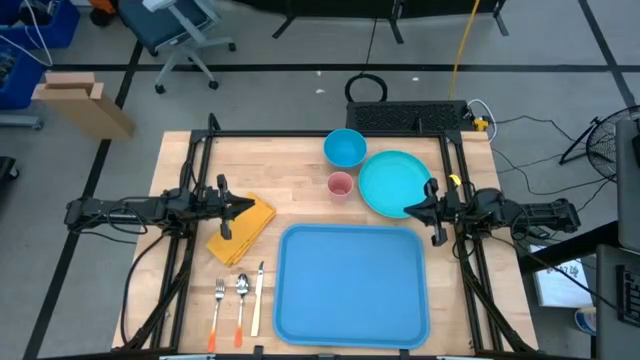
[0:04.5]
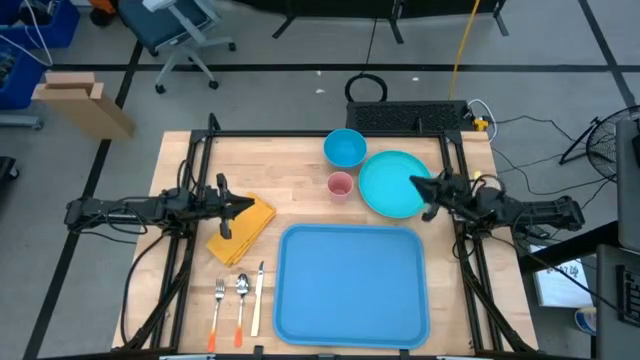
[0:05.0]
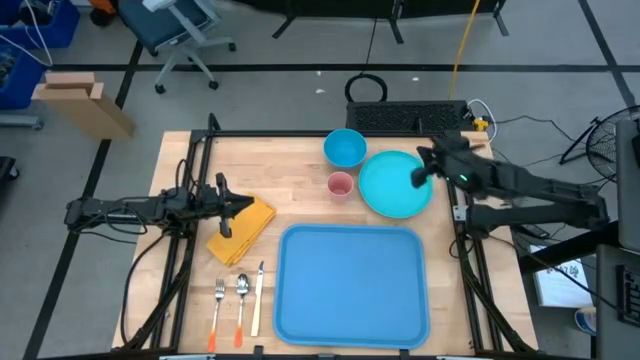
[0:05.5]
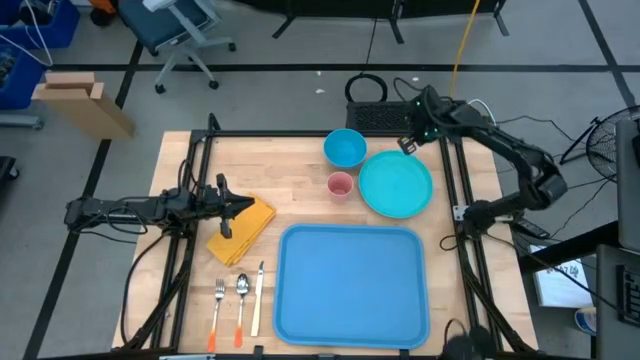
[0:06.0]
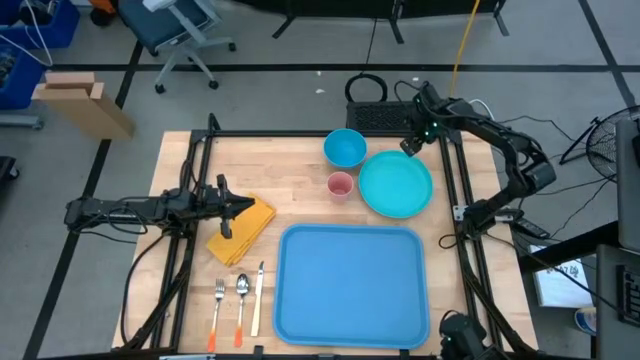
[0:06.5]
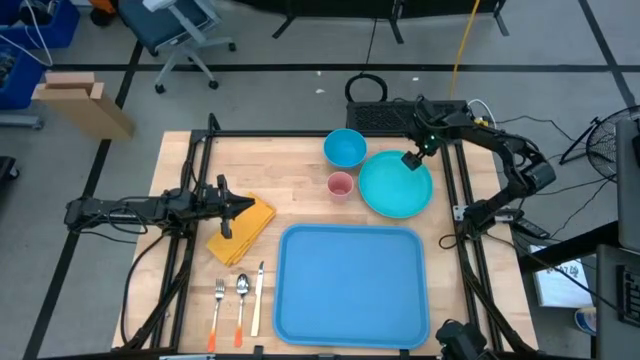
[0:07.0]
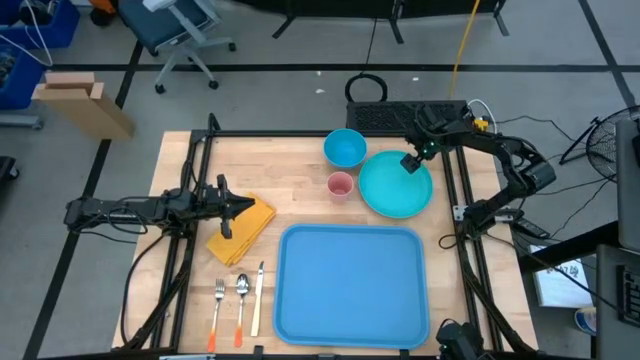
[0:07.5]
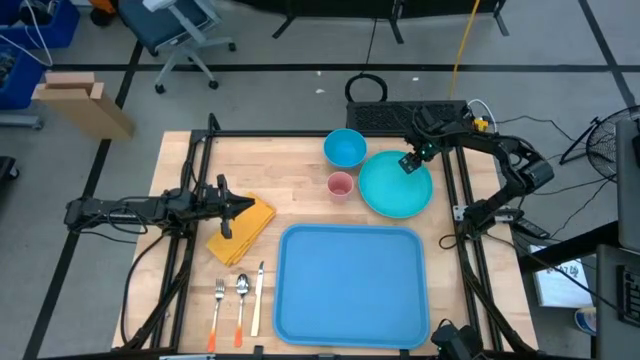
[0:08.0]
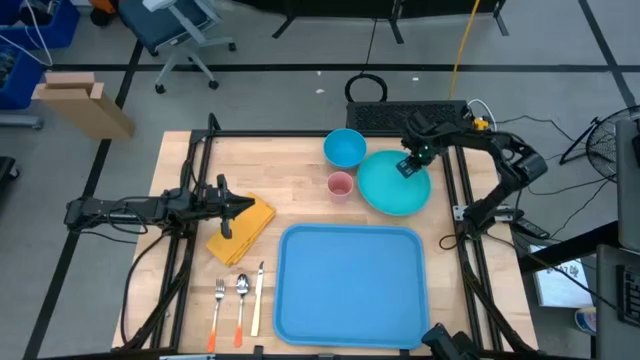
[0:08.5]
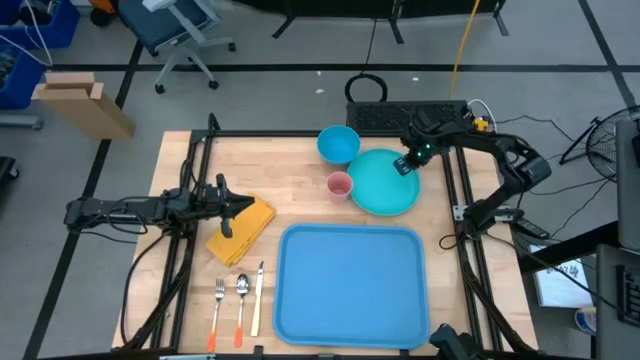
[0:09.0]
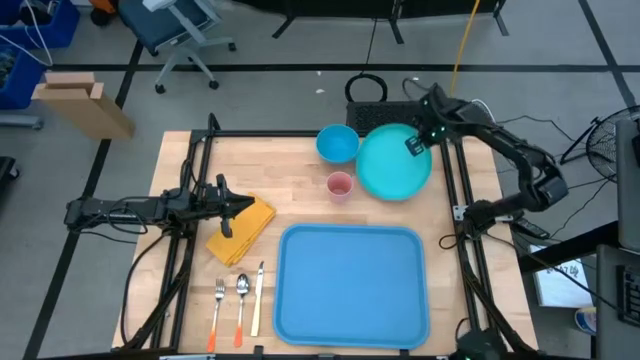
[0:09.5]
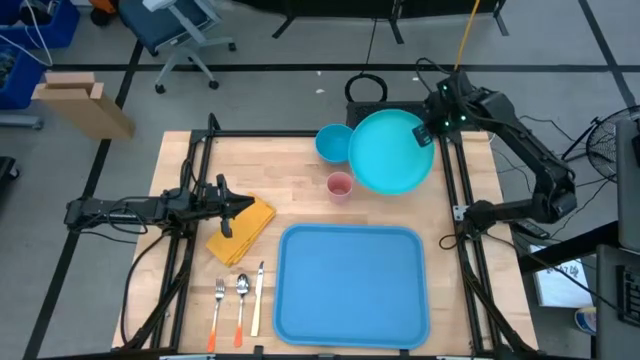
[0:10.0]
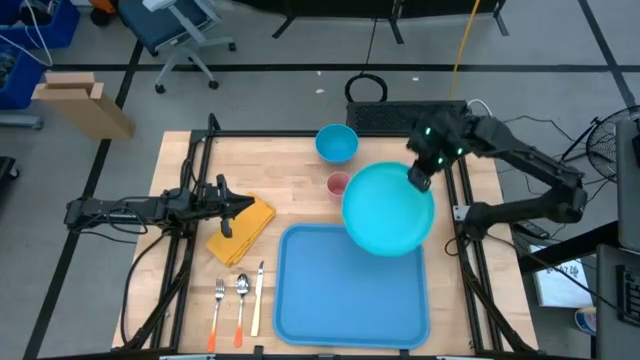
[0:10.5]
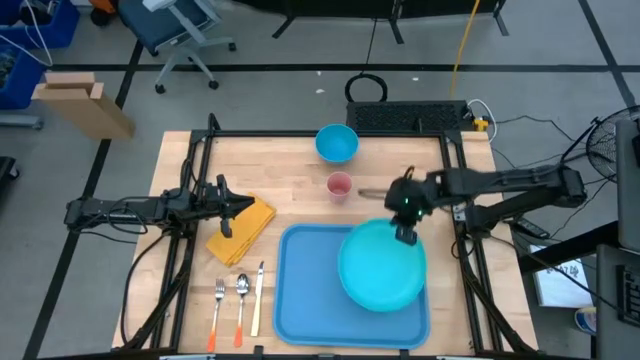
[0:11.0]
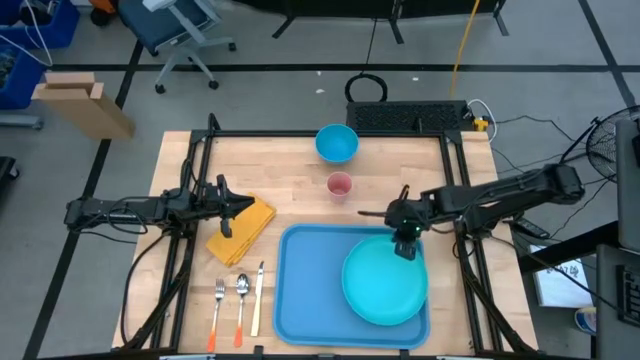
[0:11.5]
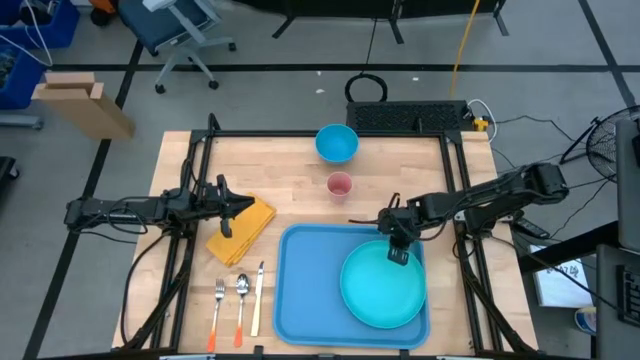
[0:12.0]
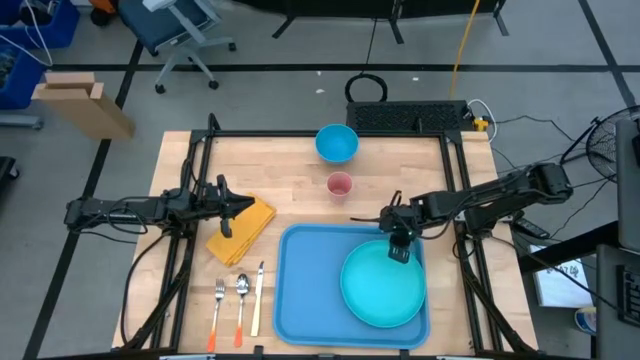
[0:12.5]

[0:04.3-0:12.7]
Task: Set up tray
Put the blue plate on the blue tray

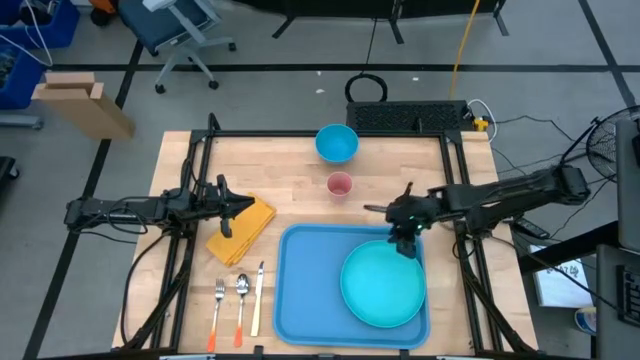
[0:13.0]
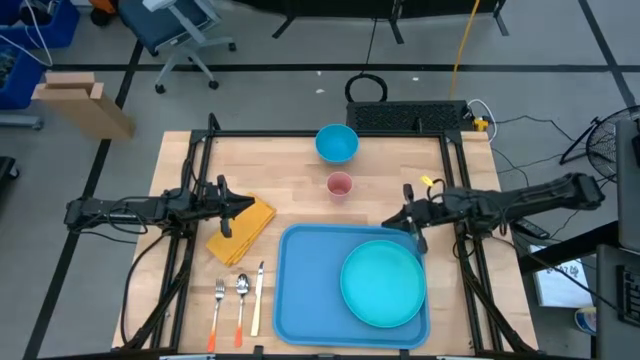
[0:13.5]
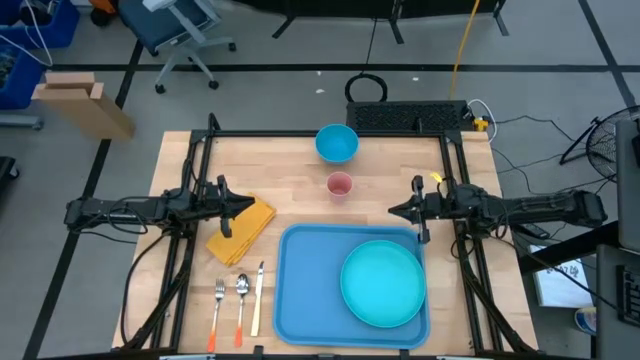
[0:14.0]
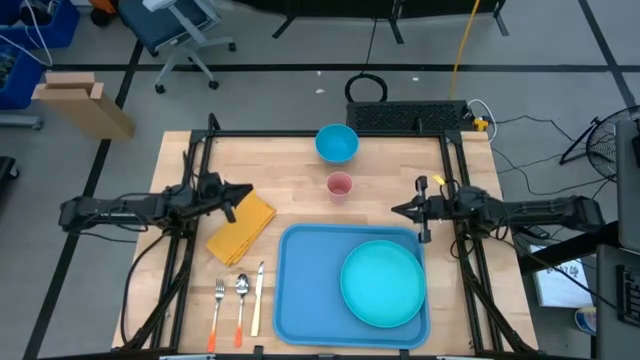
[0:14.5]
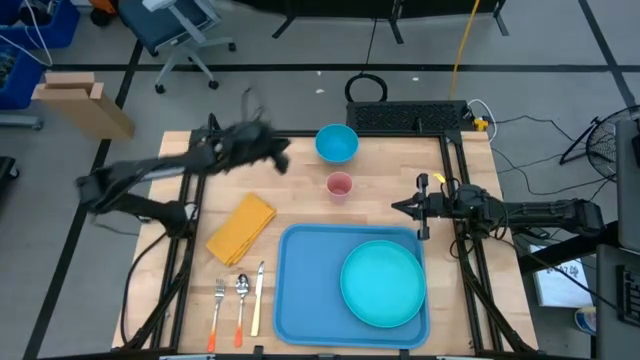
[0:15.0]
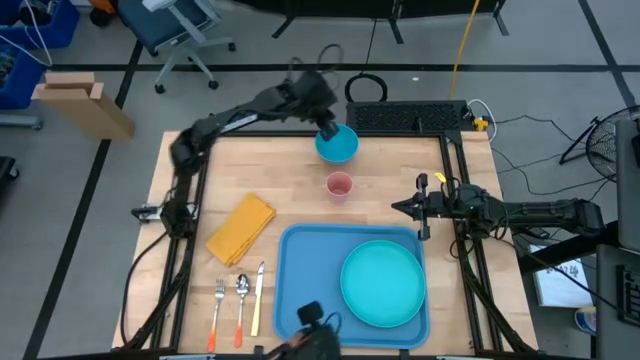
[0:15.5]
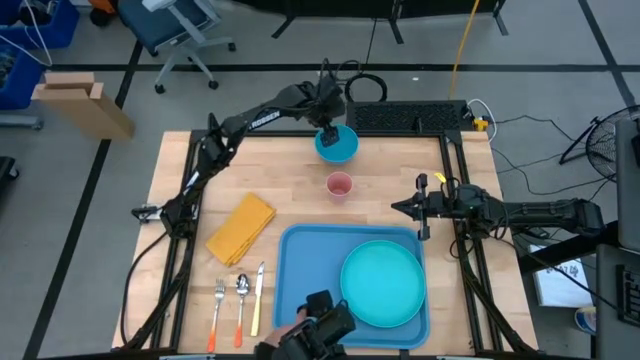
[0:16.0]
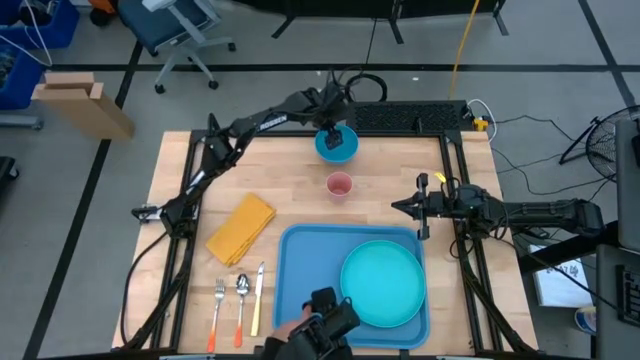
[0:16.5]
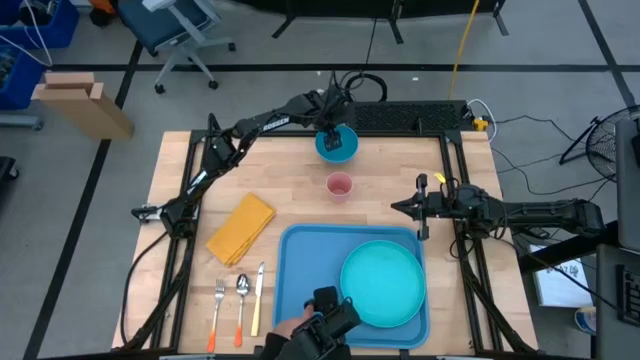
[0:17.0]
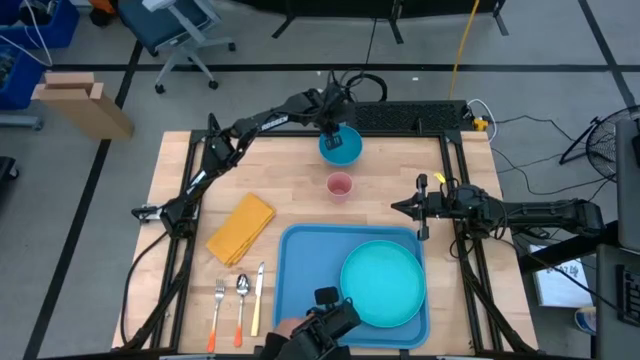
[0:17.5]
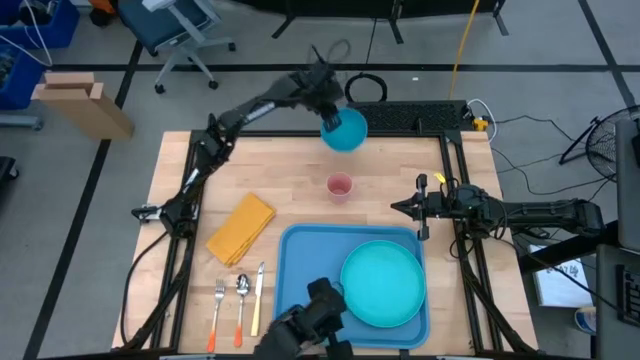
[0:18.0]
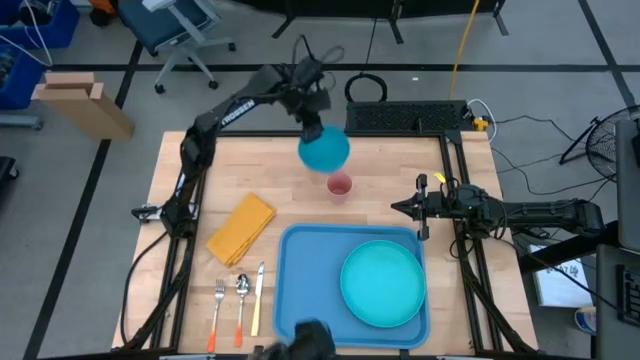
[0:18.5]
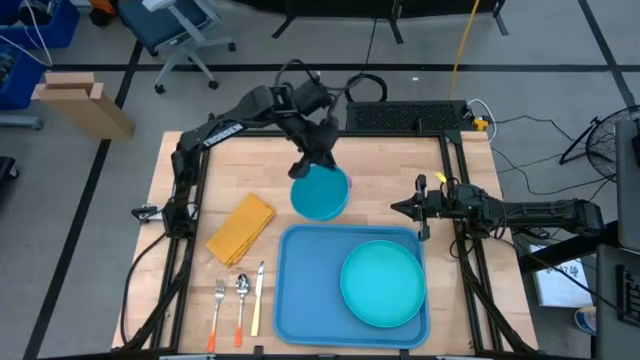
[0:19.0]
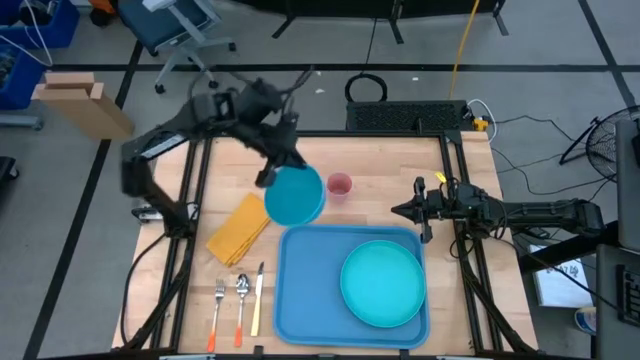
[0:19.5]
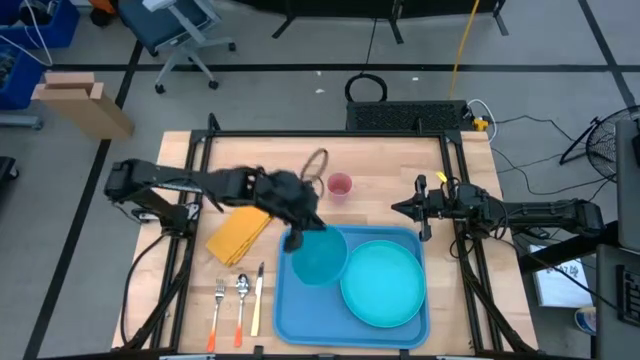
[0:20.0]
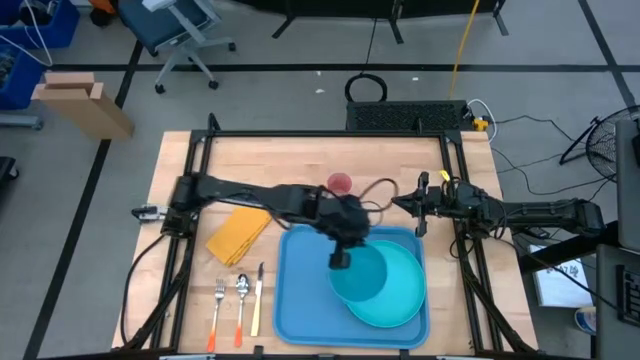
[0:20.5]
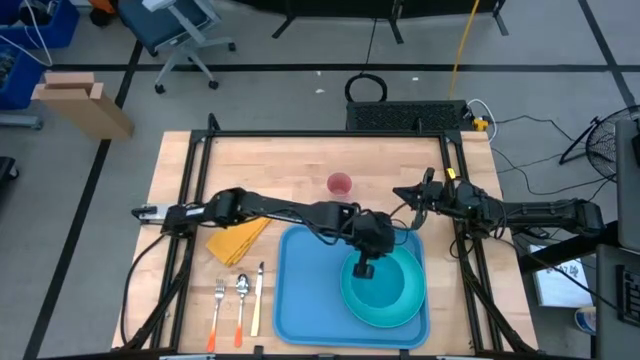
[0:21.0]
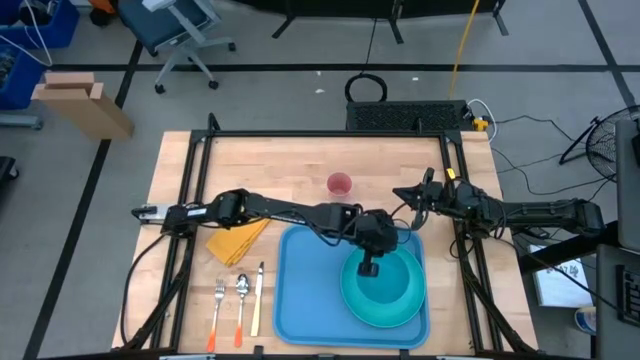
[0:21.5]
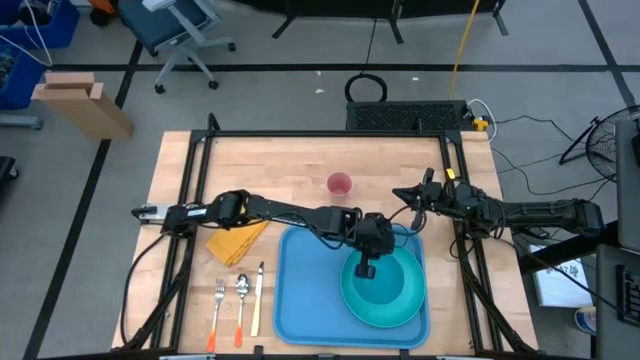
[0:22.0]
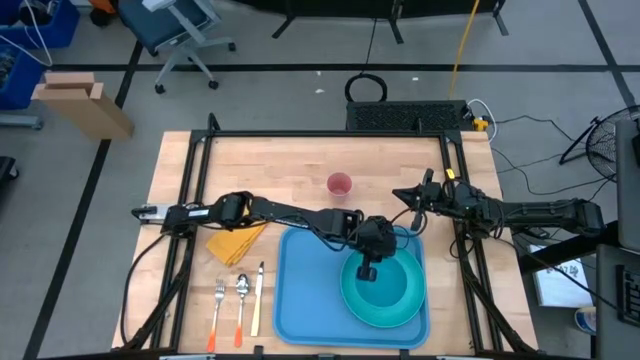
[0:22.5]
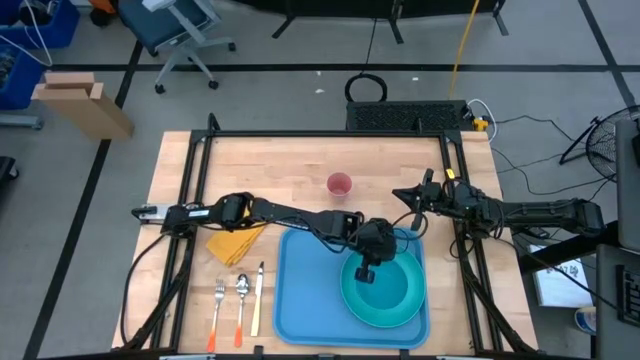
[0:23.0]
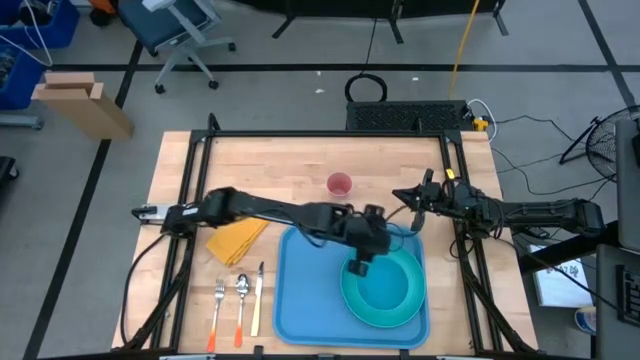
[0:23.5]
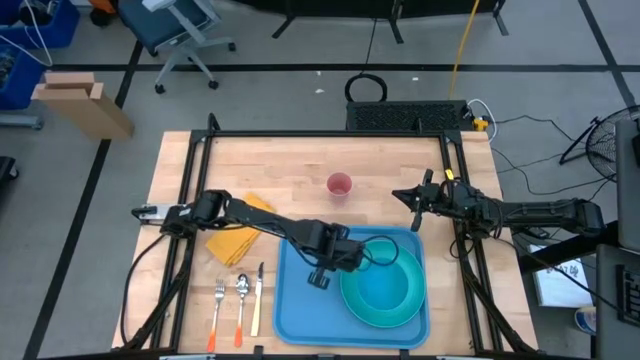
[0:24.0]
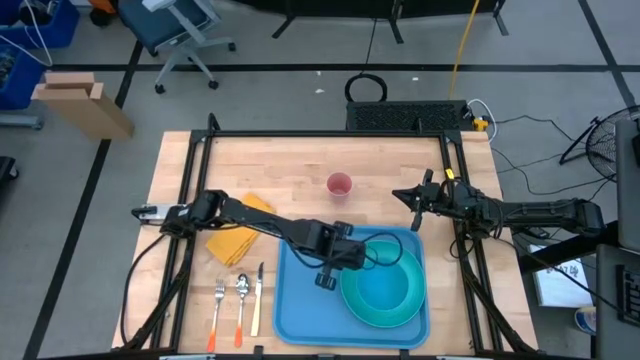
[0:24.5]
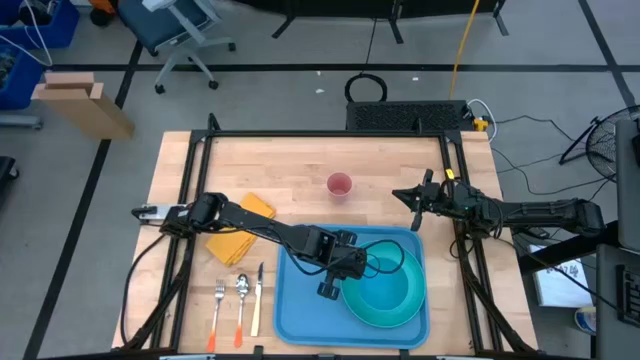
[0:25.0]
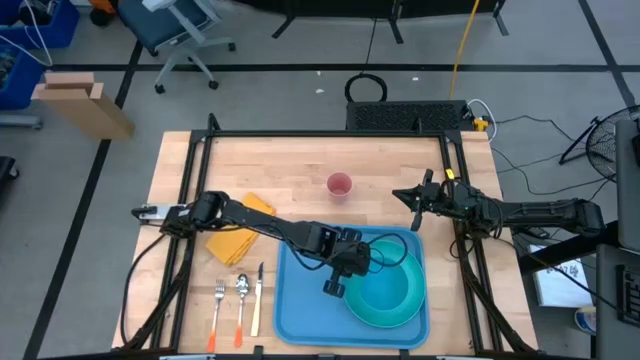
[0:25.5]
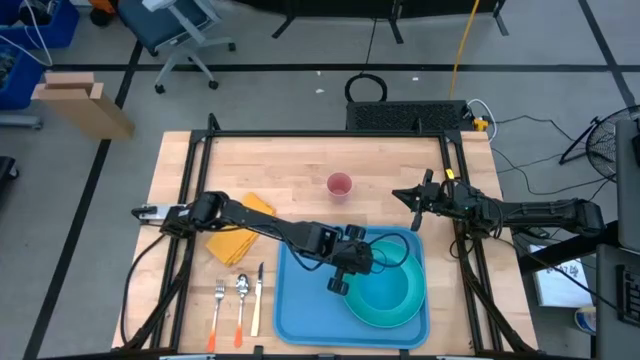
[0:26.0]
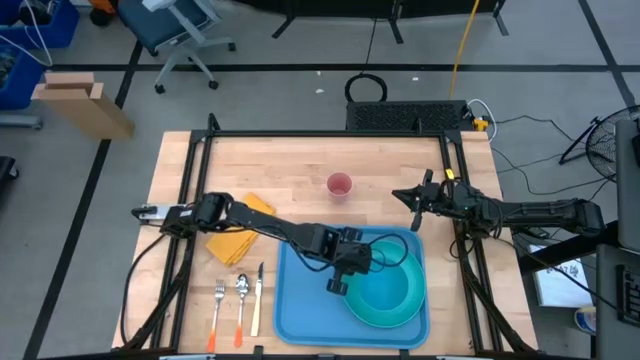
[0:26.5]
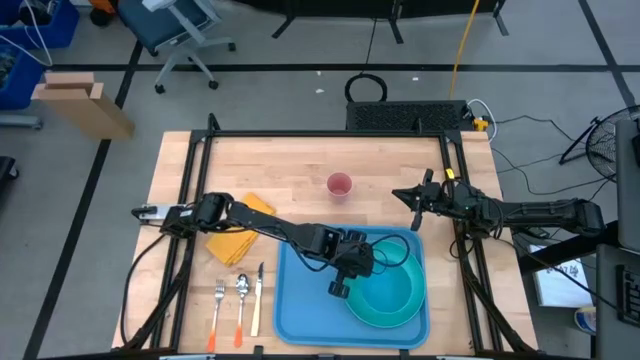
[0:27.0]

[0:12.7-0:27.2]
Put the blue bowl on top of the blue plate on the blue tray
